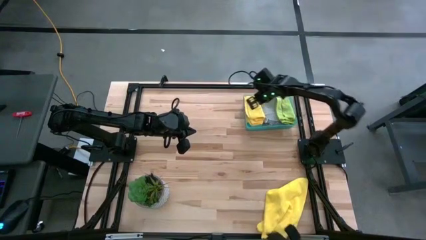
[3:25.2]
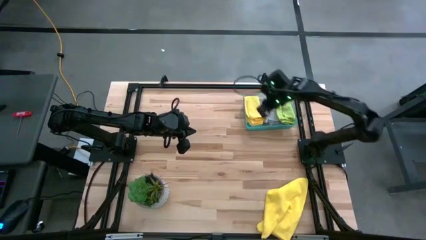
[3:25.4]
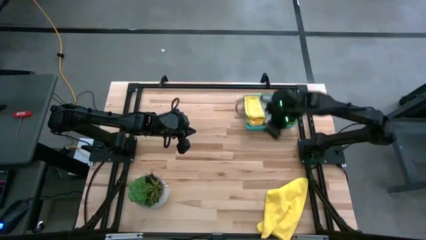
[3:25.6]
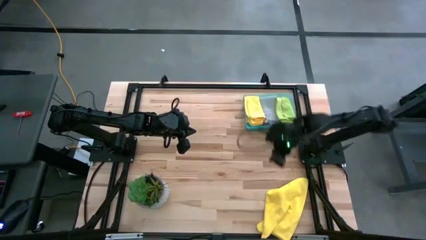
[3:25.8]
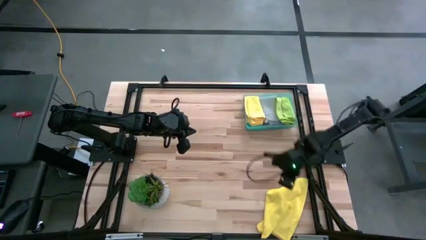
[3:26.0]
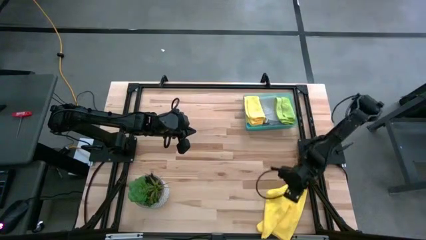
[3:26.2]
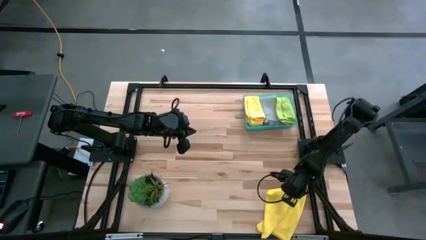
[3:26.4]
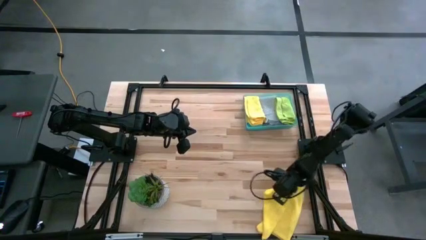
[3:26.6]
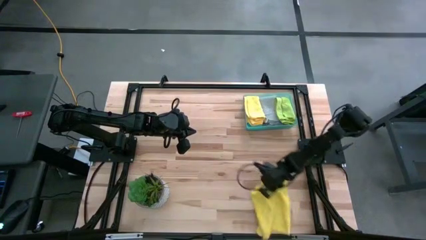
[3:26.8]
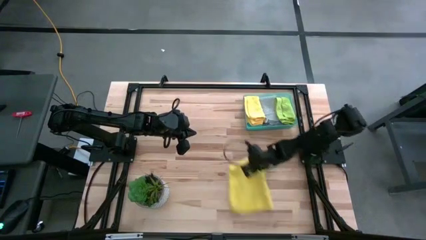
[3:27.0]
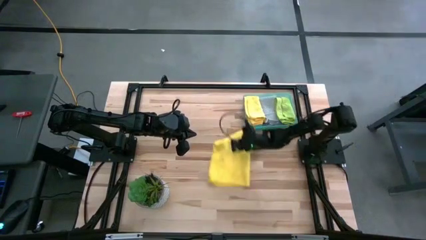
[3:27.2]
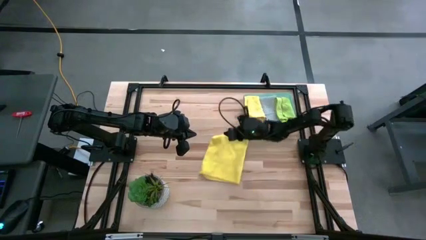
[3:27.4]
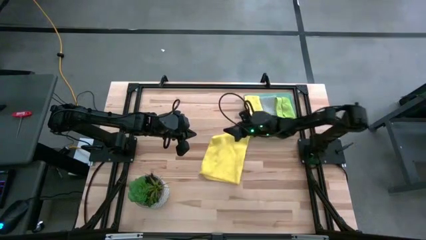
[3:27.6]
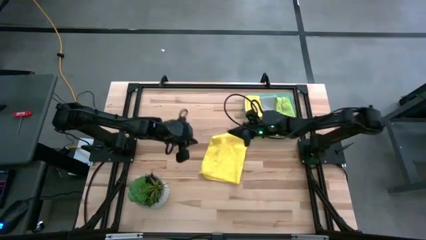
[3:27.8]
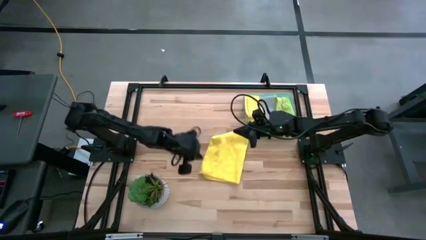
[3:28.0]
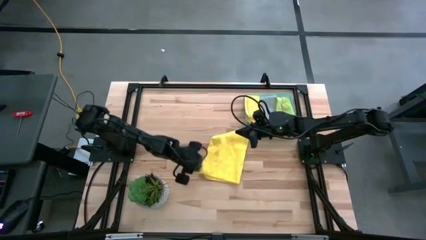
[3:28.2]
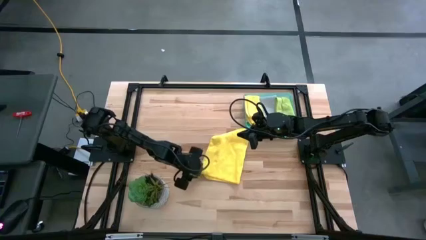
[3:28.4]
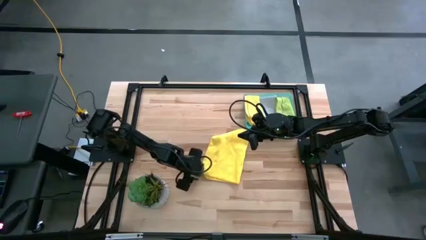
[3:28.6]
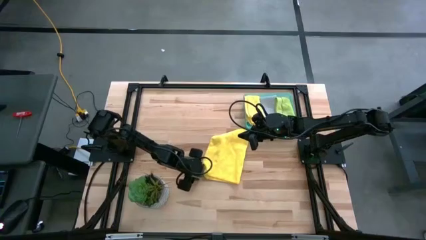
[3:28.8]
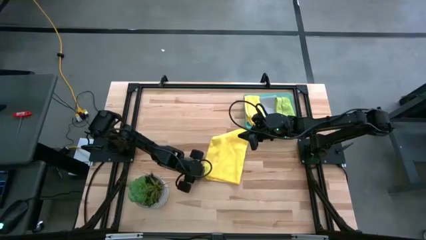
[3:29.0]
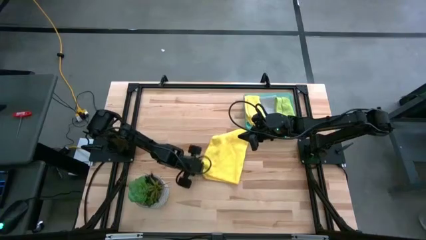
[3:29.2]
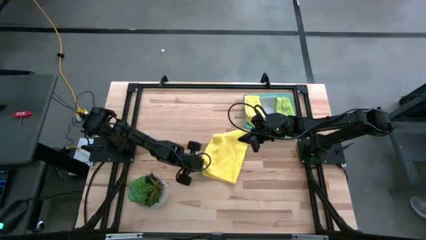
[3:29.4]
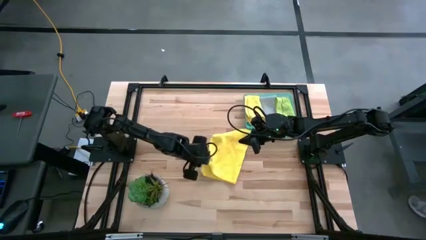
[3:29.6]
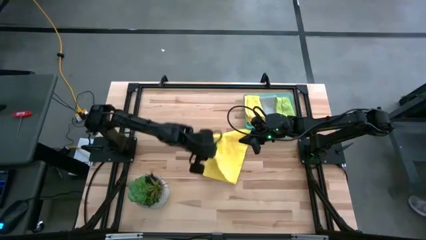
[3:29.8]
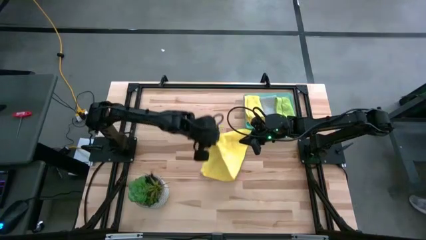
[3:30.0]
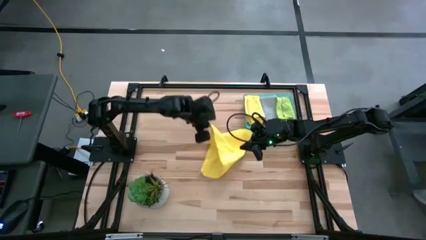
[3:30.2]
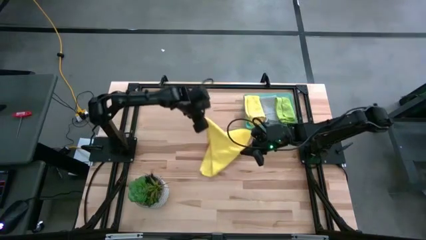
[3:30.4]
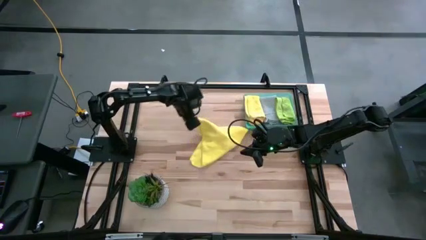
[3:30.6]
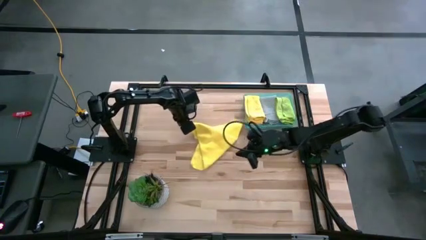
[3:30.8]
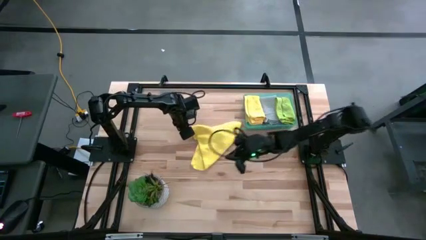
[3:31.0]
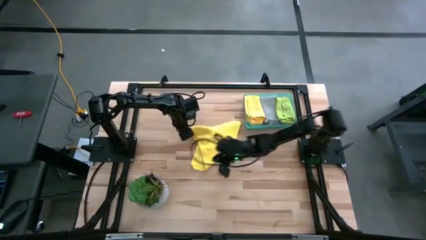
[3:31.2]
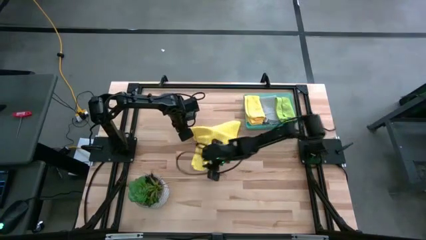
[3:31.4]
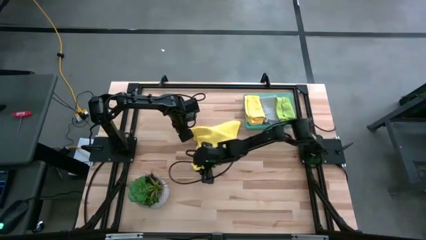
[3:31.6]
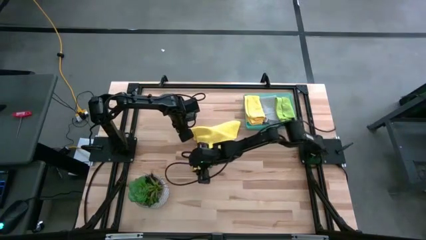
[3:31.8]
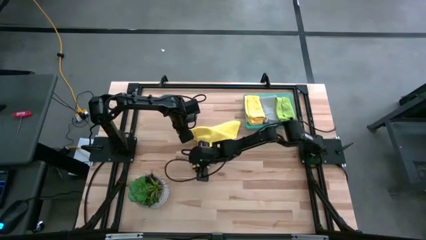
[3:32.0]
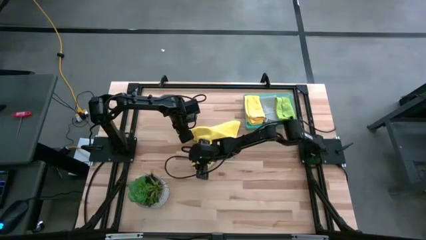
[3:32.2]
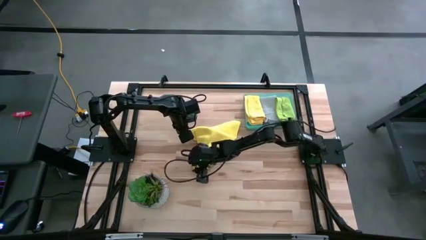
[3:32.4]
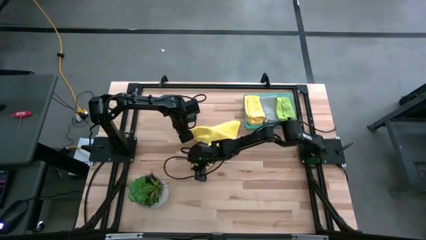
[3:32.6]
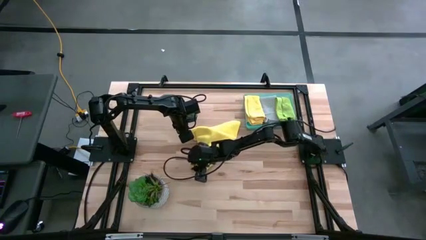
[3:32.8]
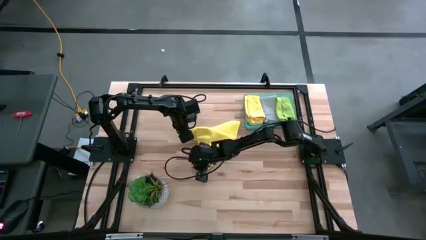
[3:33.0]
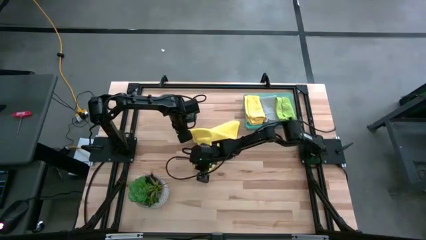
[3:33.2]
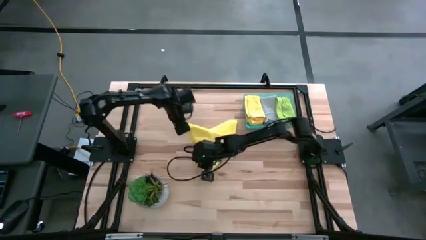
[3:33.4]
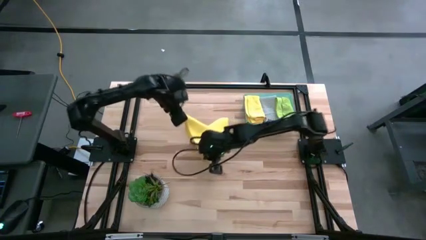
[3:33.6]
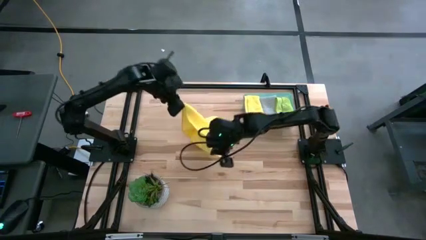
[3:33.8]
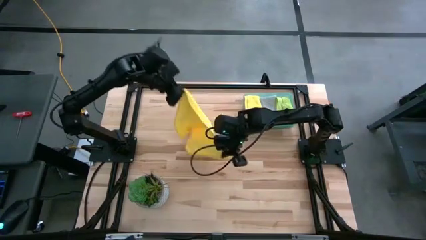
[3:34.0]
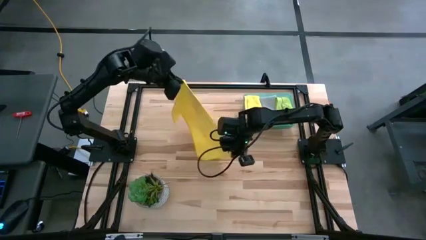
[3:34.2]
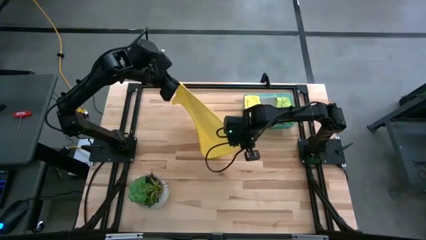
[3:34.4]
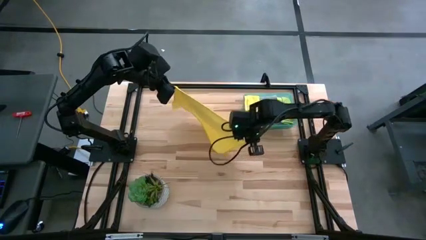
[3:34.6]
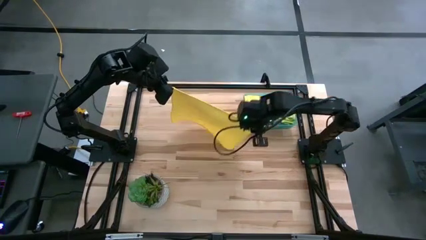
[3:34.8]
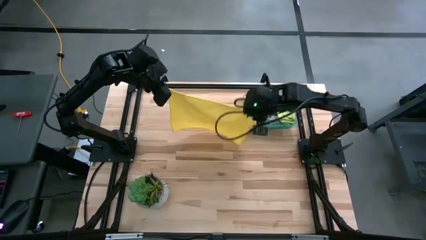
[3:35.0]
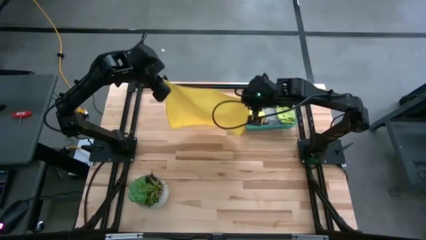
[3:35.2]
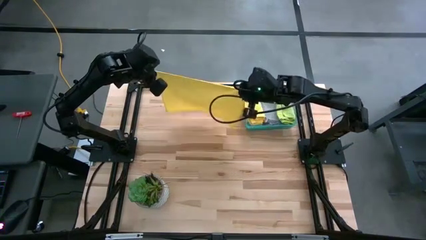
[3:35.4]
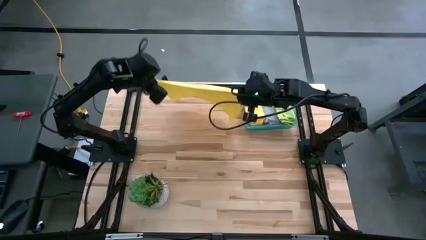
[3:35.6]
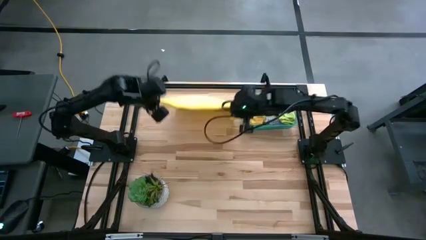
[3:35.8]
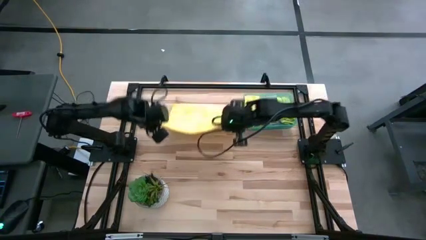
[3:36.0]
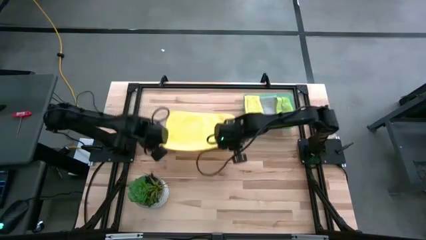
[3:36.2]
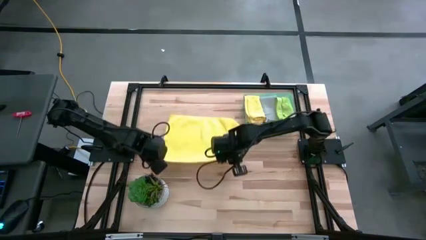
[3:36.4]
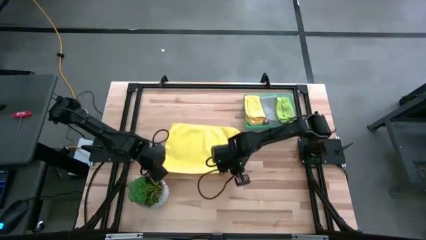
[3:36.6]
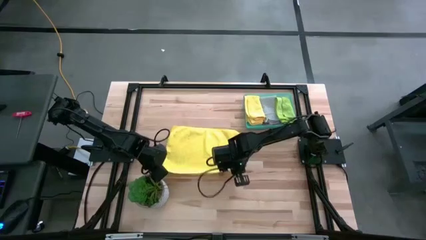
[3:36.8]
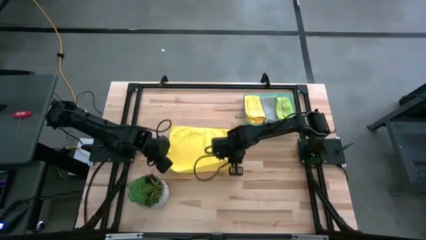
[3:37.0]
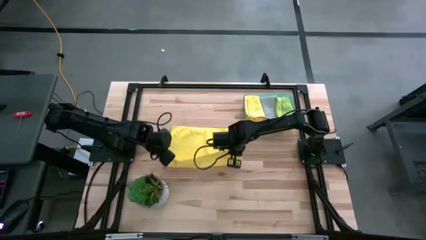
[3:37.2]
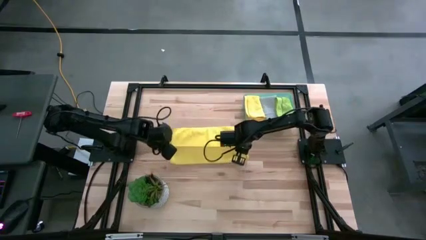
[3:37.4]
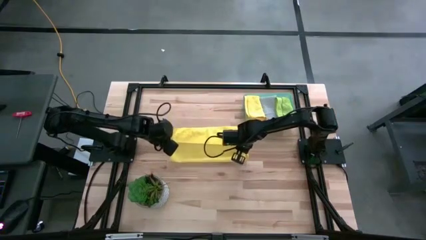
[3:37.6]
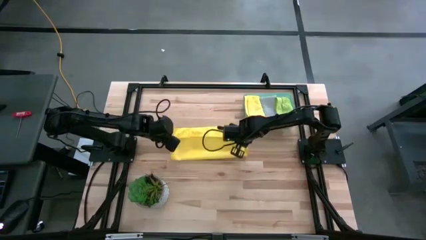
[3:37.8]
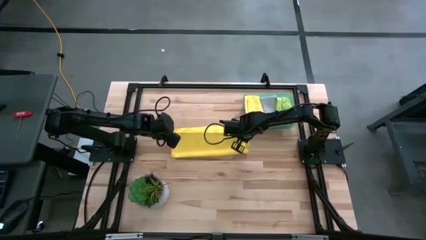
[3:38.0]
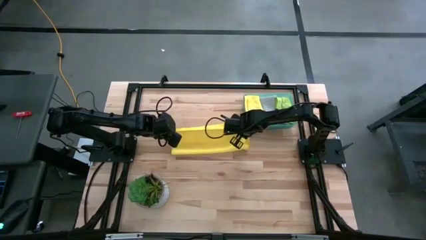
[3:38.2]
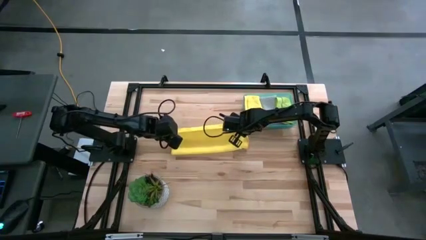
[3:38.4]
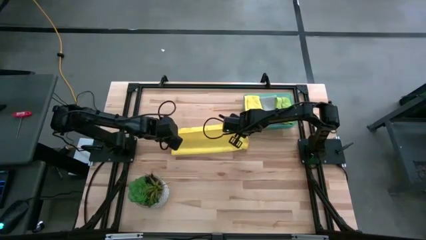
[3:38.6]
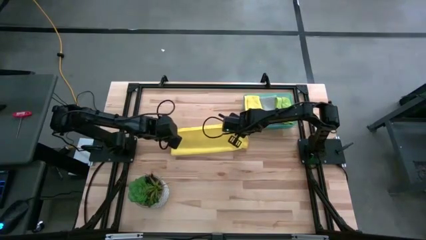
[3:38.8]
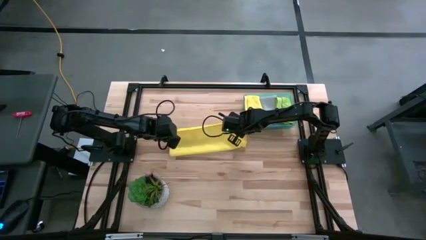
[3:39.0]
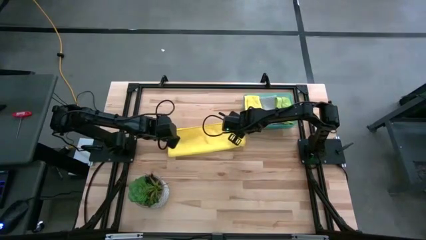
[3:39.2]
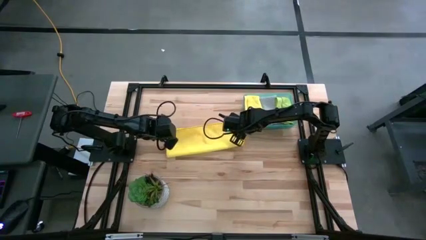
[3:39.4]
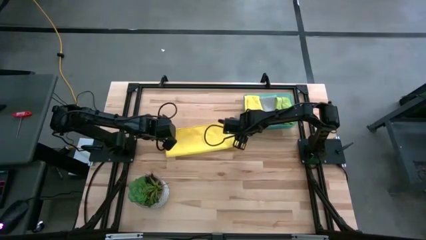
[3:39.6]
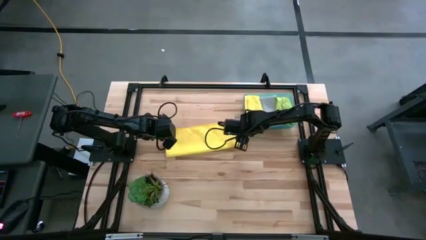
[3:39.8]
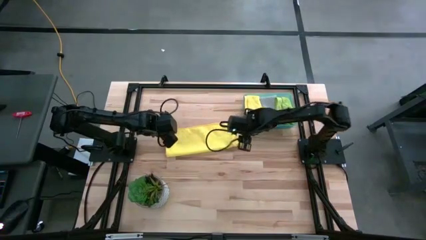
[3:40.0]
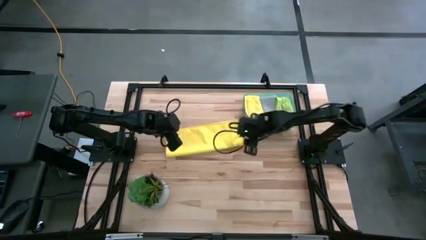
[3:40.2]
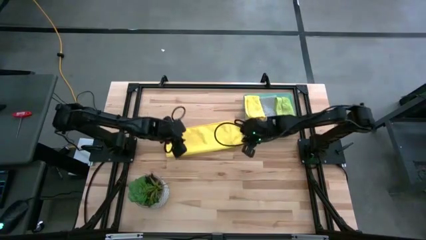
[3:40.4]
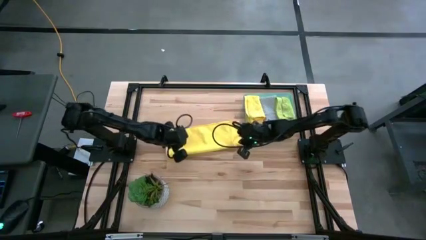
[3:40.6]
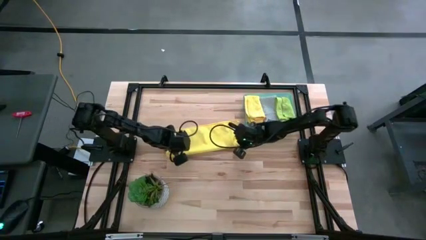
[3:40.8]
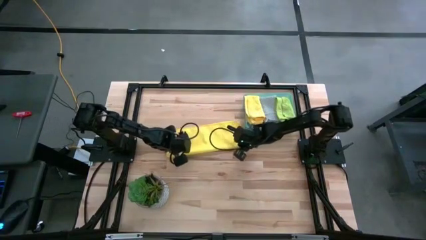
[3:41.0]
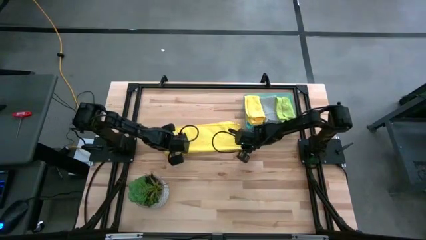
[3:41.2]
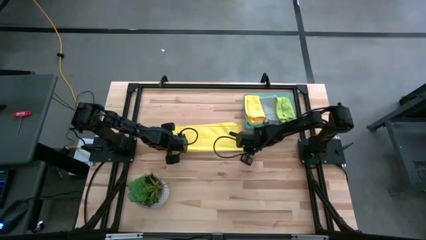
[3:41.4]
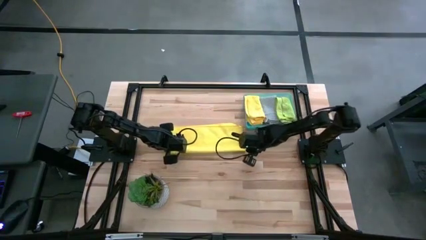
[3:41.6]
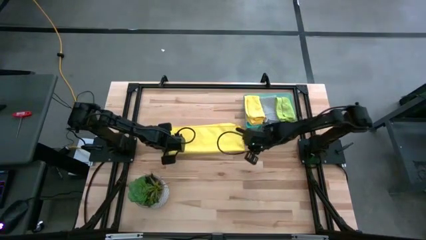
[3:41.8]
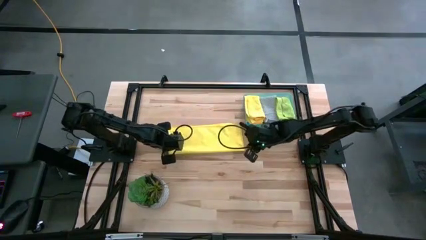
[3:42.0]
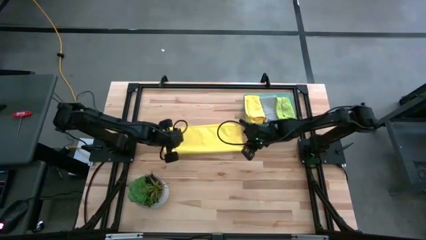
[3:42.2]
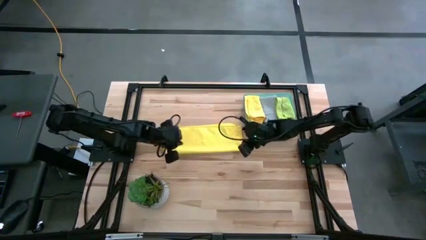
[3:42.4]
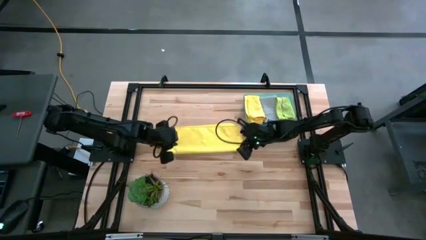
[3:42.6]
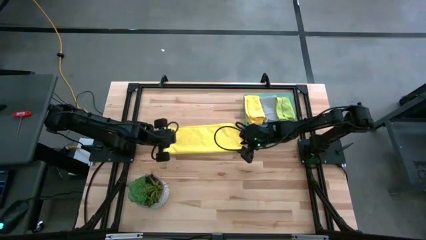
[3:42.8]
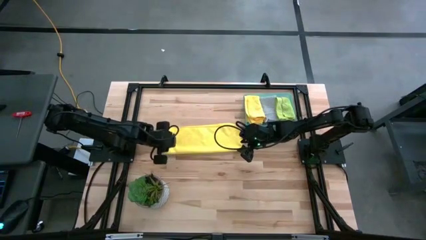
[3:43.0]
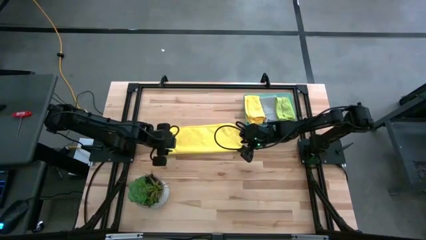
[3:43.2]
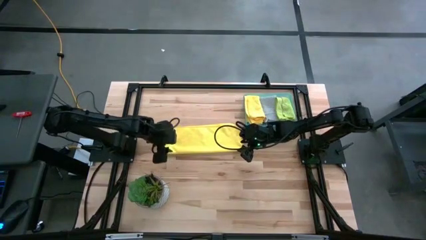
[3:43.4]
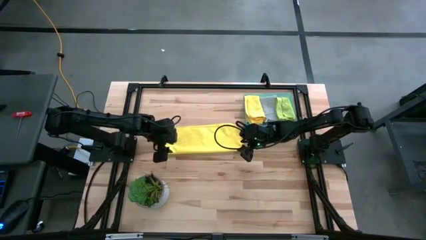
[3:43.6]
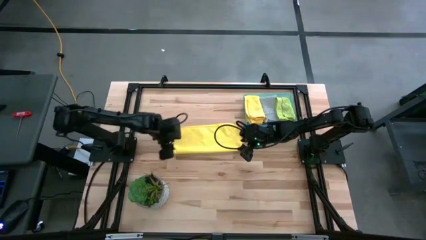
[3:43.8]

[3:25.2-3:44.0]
Task: Fold microfiber towels
Fold the yellow towel
